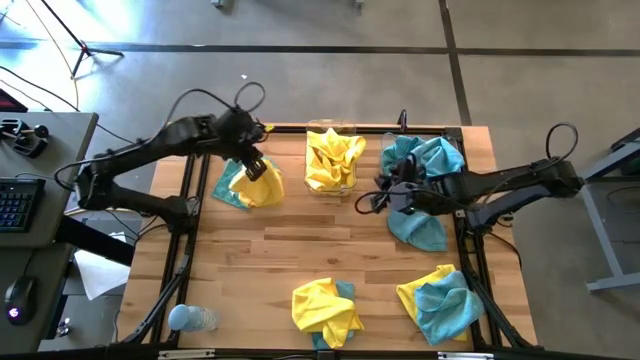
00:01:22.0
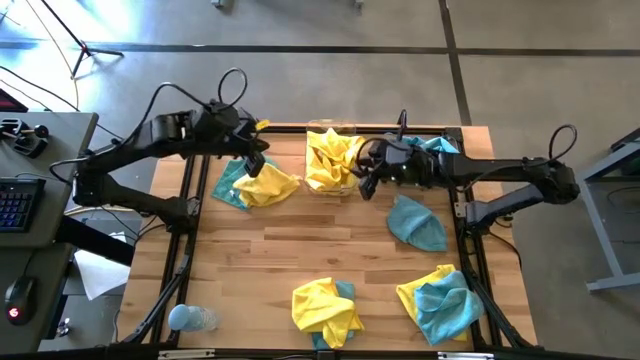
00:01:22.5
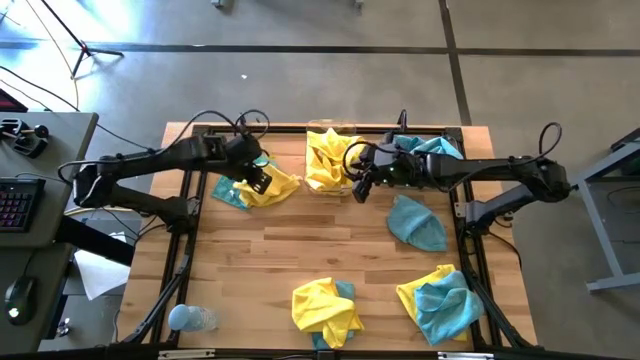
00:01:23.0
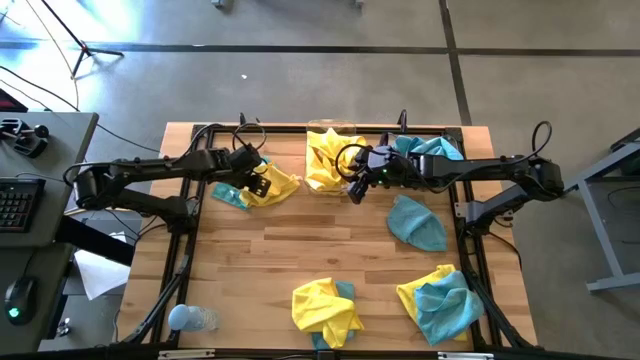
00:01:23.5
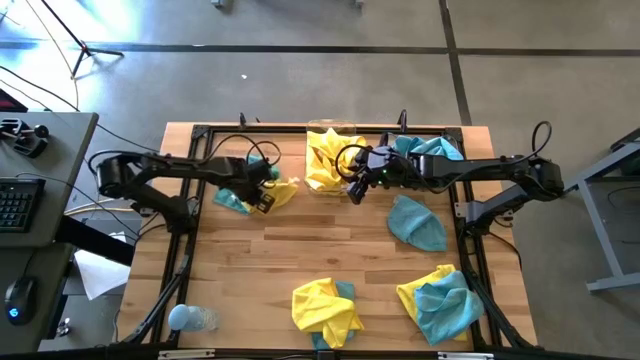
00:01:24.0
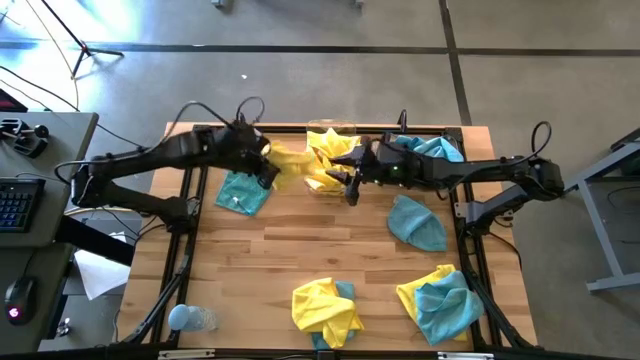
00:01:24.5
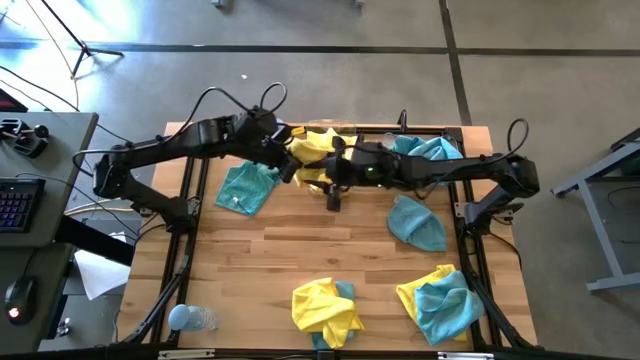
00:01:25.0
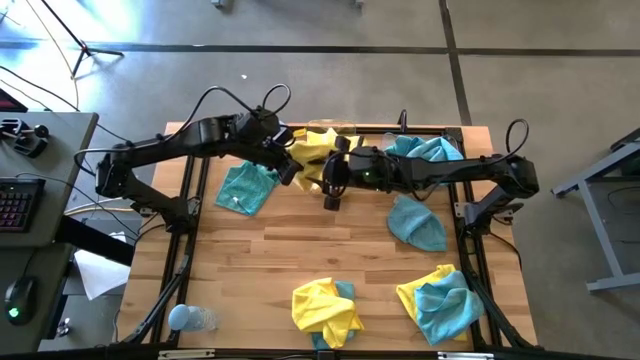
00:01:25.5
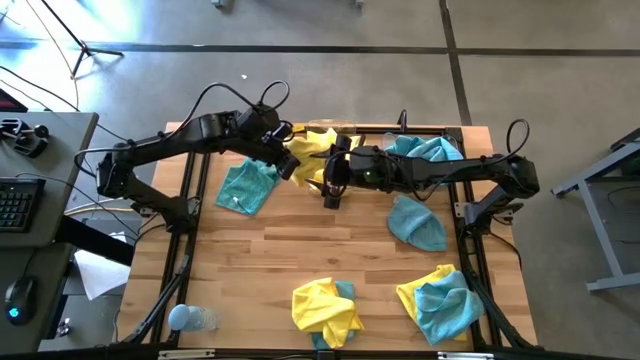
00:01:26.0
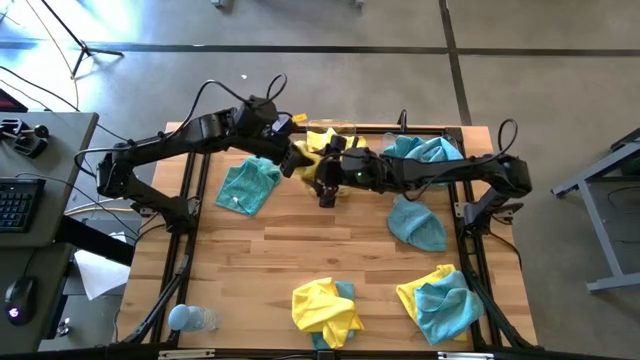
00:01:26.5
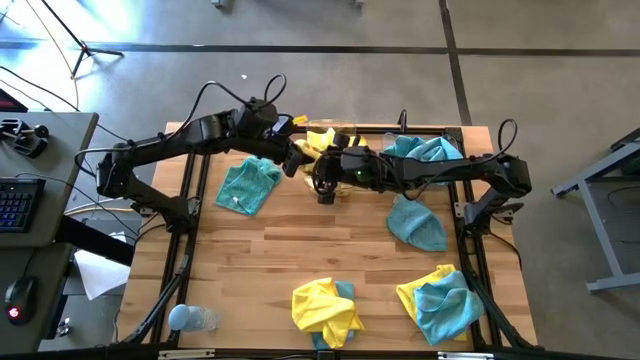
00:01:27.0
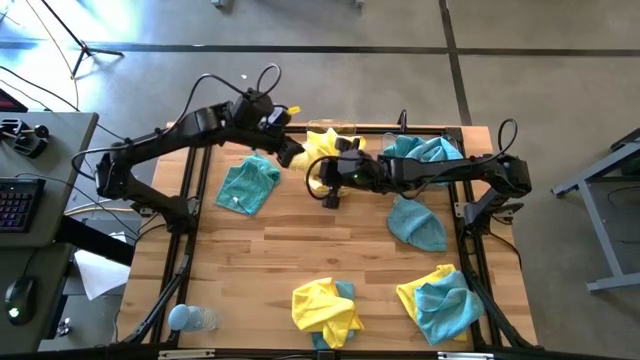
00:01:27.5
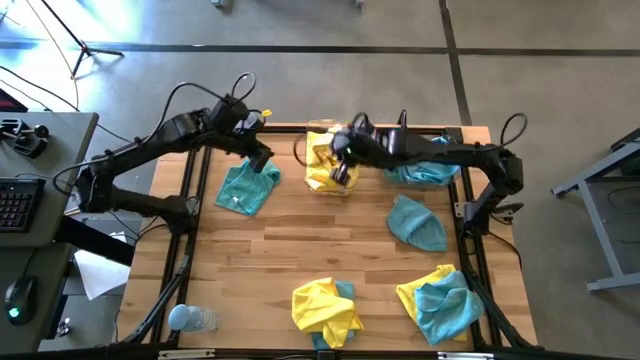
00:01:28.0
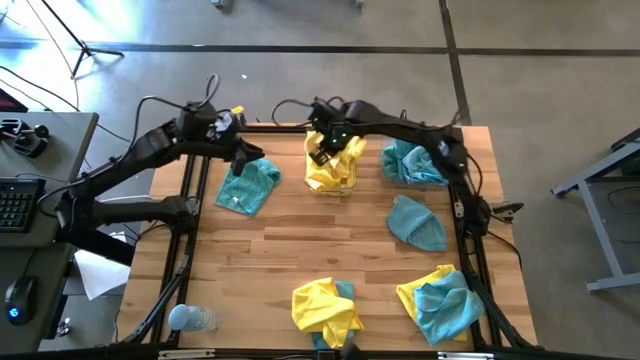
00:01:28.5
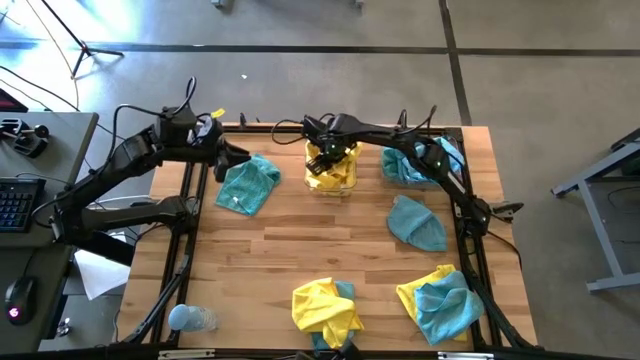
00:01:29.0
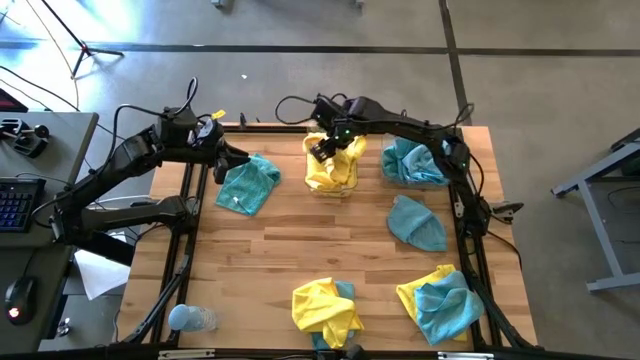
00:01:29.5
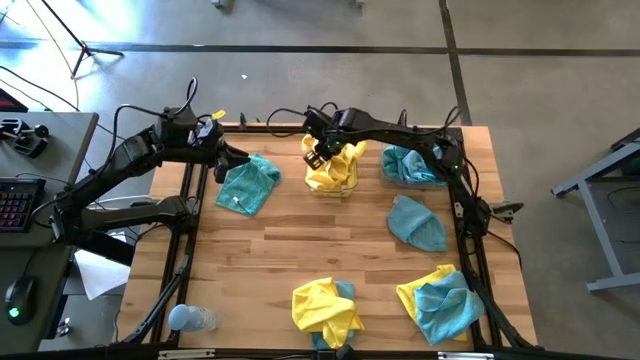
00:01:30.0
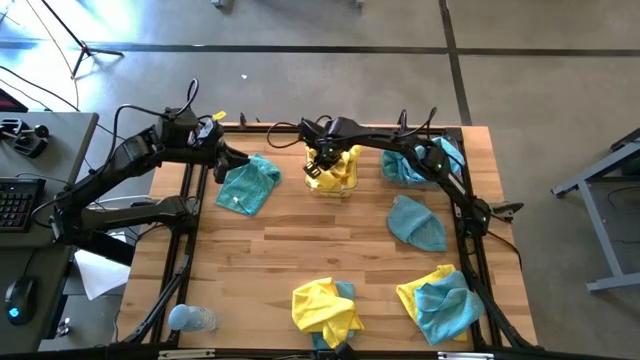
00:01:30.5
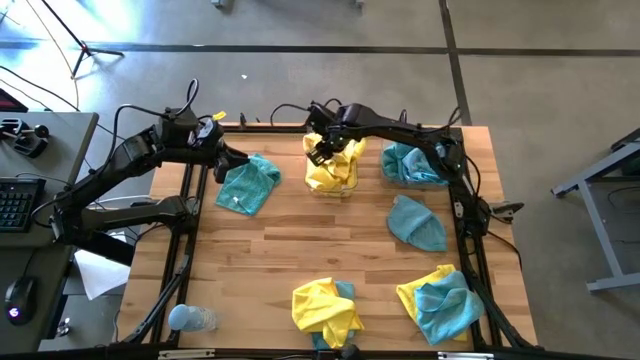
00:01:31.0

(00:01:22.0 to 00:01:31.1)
Task: Sort microfiber towel by color & place in baskets
Put the yellow towel into the left transparent bin

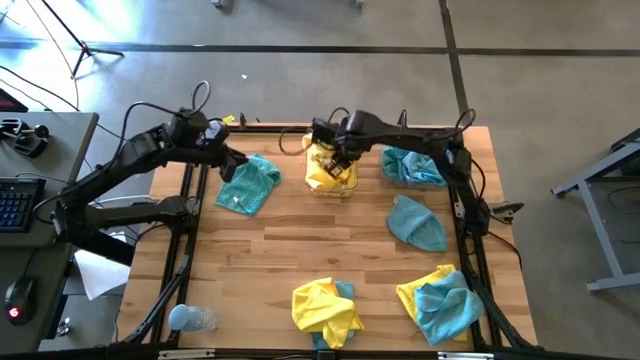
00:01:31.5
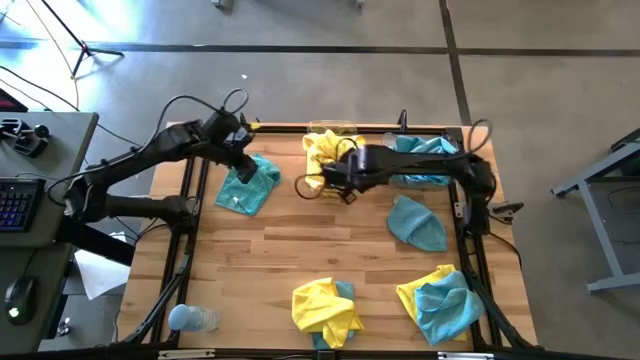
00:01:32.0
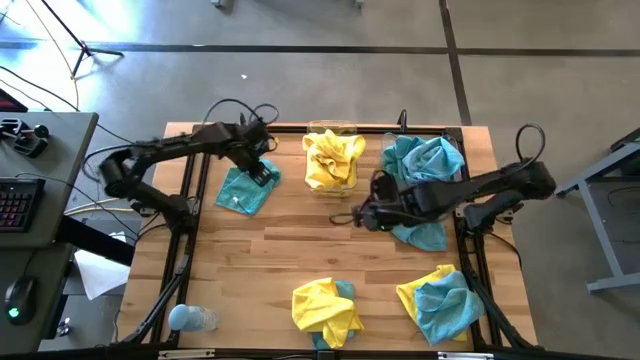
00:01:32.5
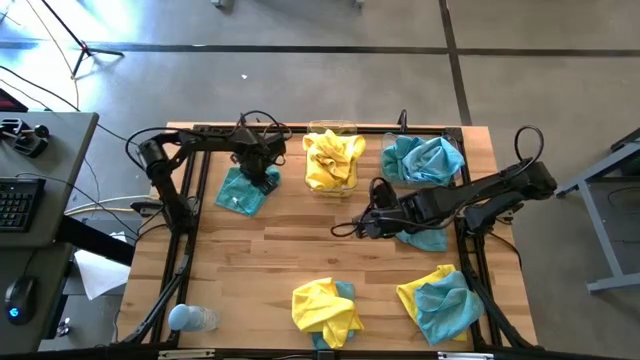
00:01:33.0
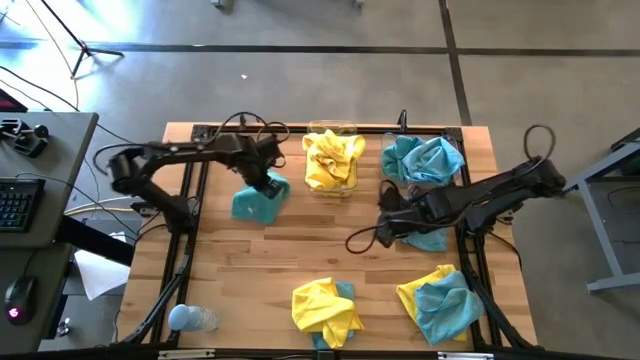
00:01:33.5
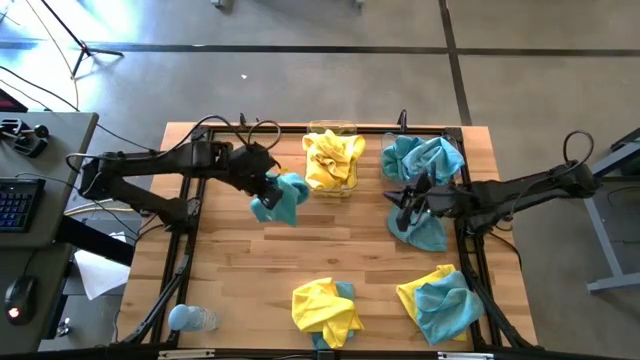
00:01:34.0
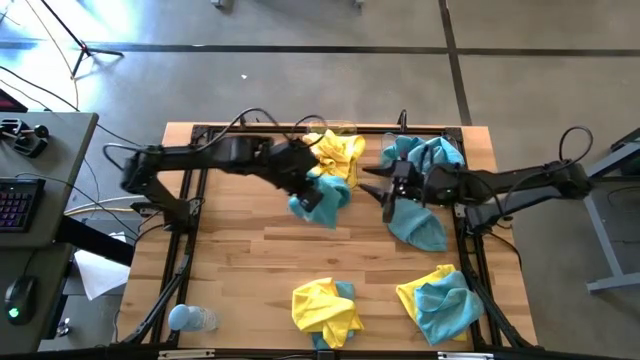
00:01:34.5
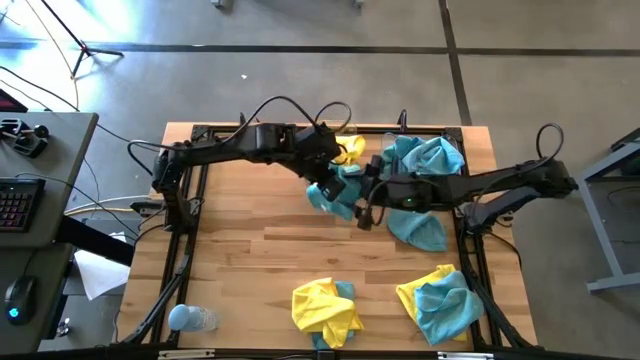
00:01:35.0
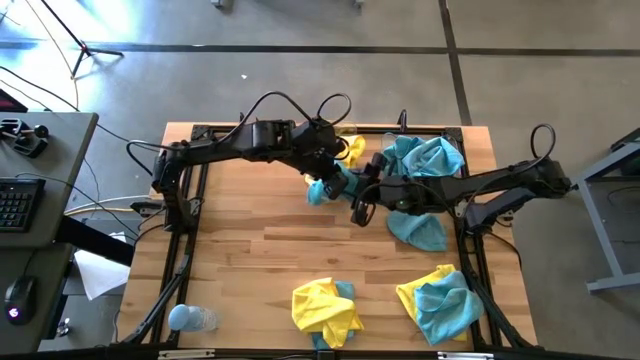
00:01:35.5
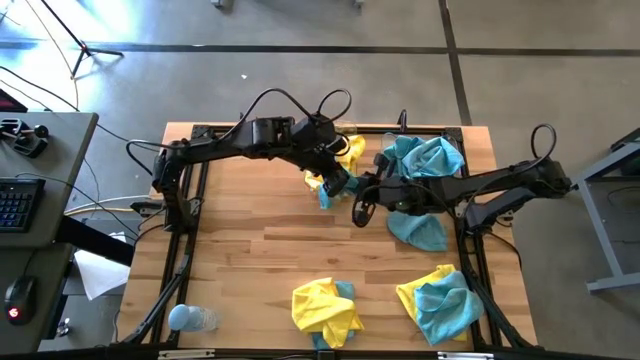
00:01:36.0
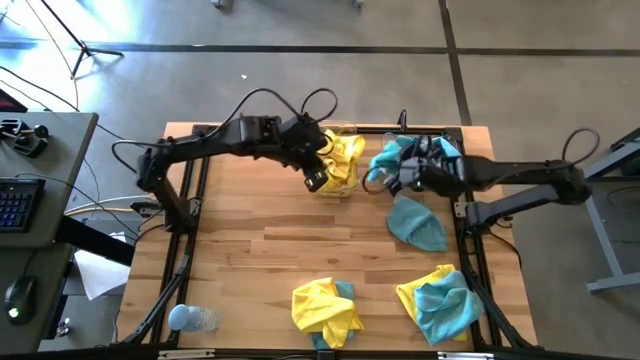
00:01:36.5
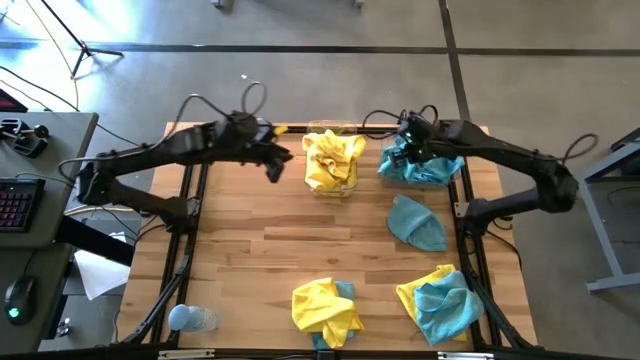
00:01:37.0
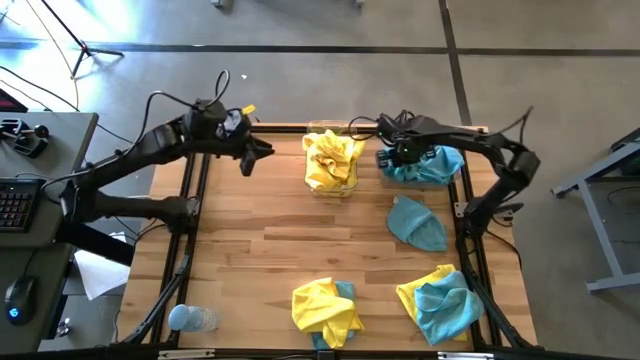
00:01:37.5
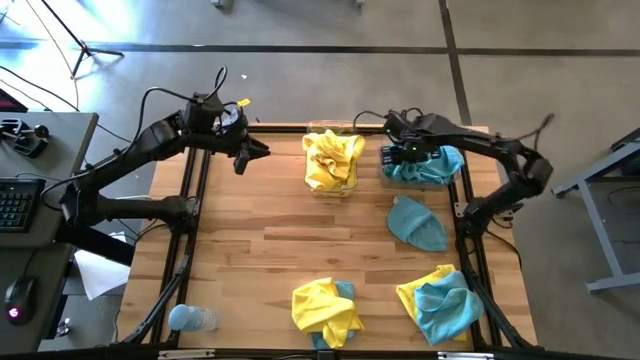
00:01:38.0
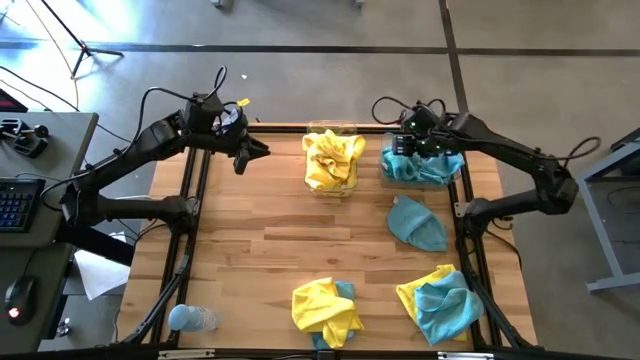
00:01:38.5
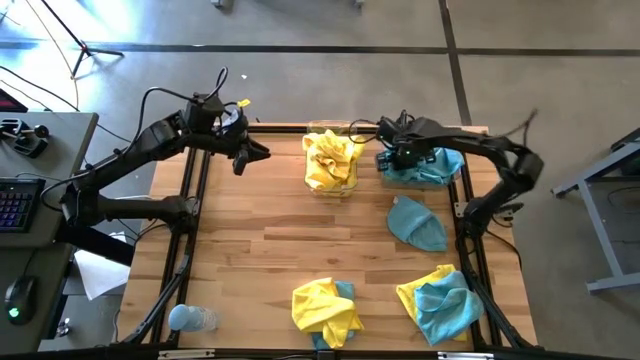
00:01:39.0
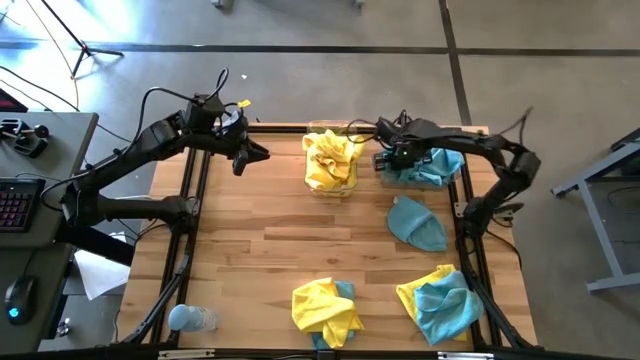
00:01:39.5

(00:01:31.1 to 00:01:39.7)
Put the blue towel into the right transparent bin

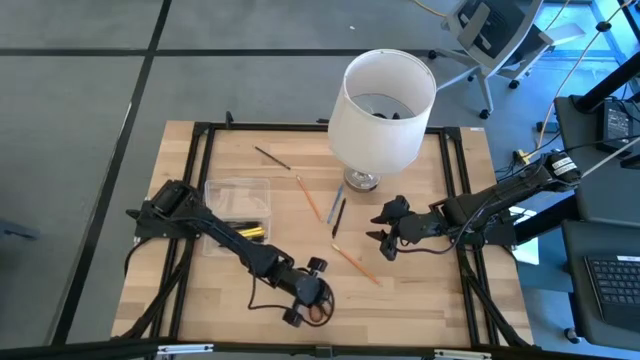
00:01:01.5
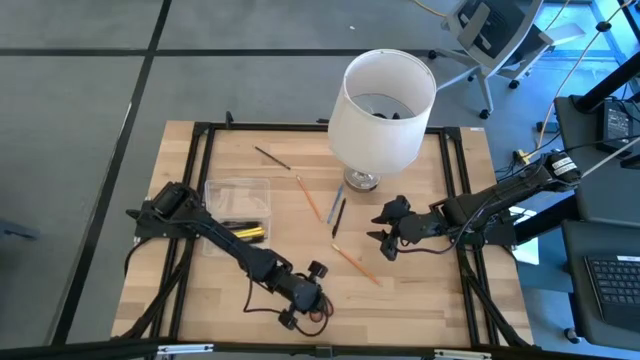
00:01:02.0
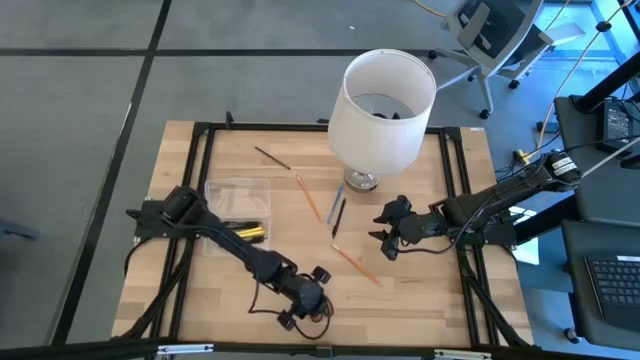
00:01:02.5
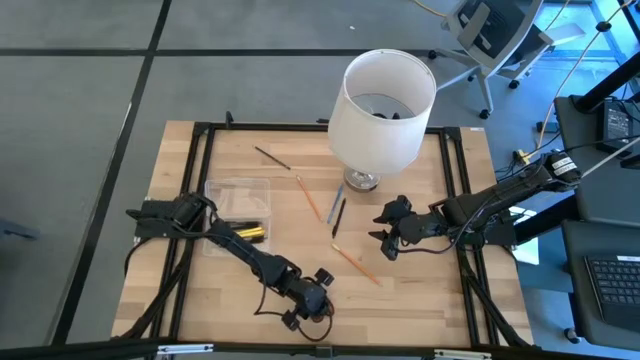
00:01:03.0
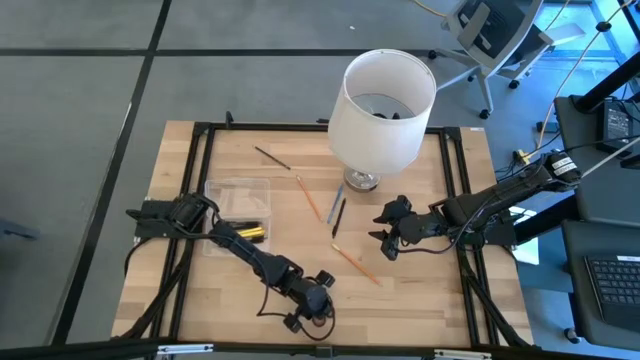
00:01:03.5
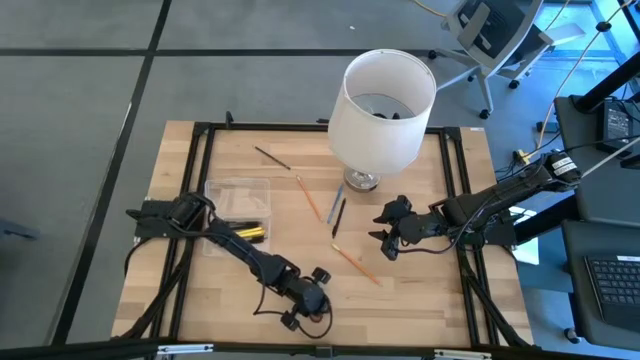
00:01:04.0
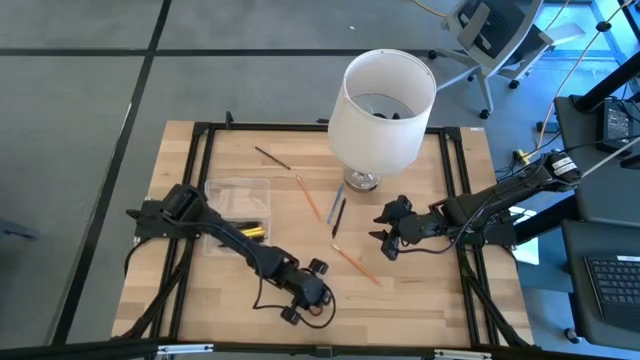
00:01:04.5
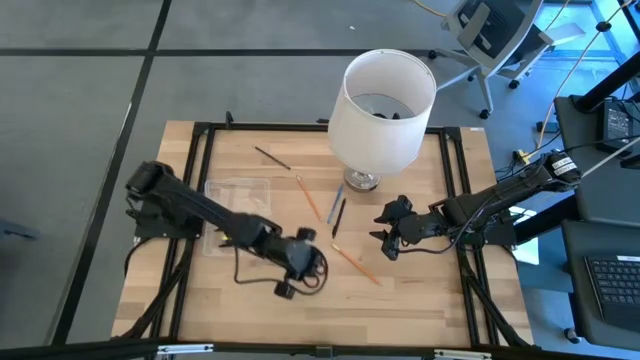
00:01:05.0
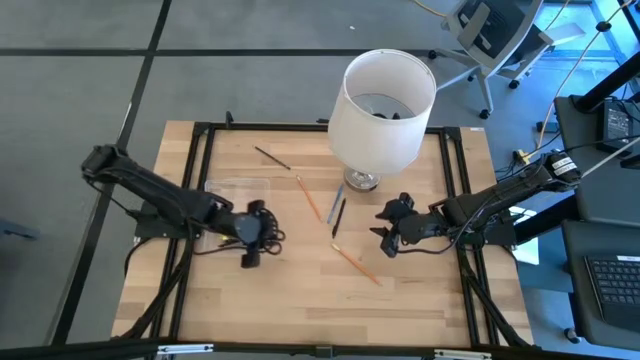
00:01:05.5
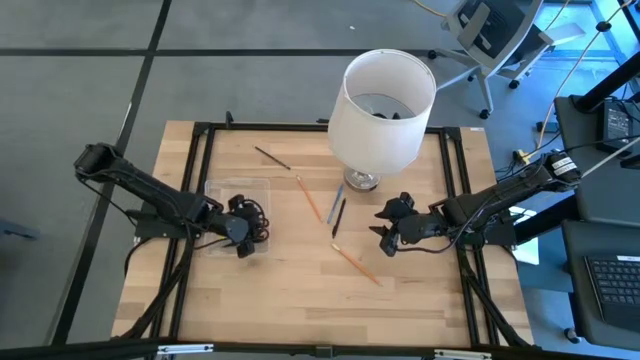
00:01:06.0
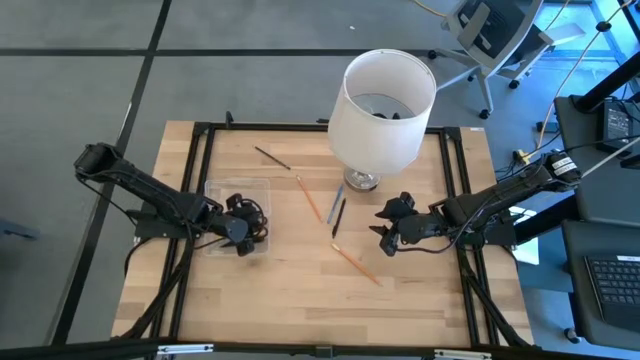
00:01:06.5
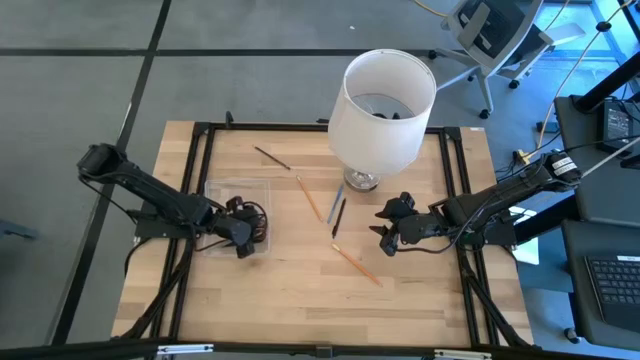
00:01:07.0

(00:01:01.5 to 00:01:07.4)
Task: Pick & place school supplies into a supply box
Put the black scissors into the transparent supply box
